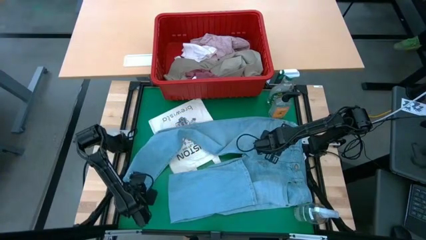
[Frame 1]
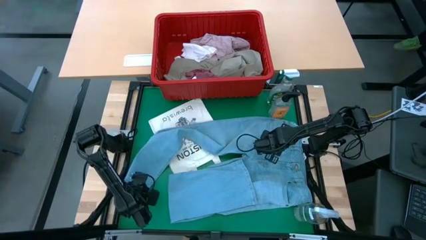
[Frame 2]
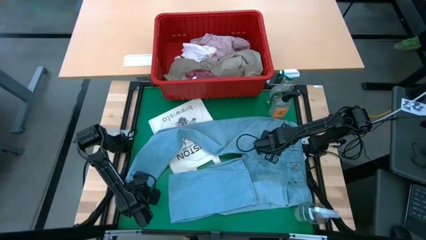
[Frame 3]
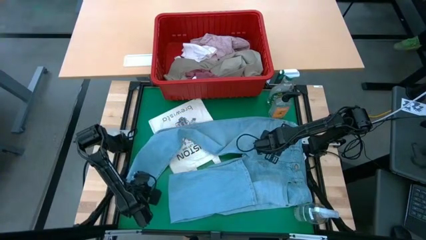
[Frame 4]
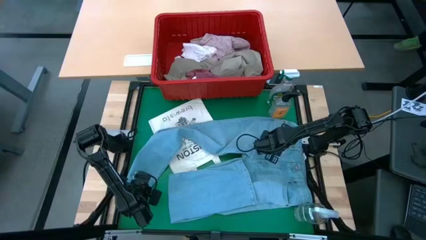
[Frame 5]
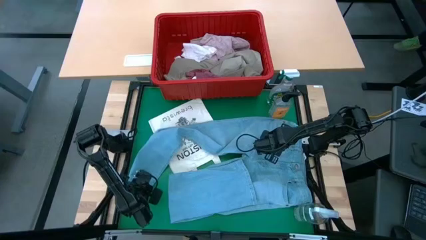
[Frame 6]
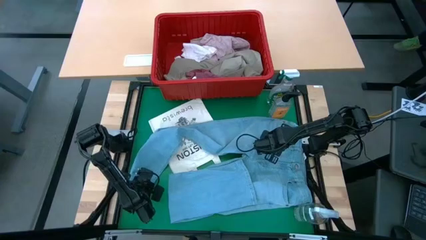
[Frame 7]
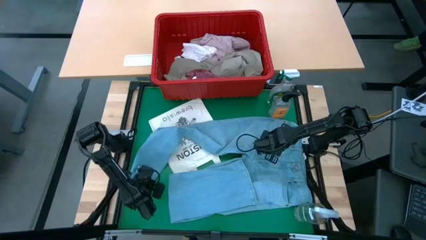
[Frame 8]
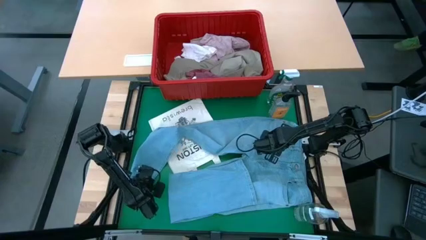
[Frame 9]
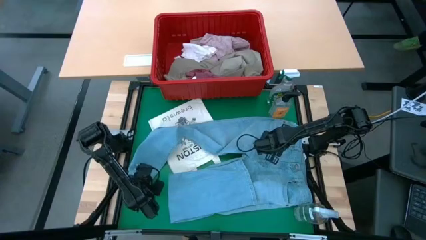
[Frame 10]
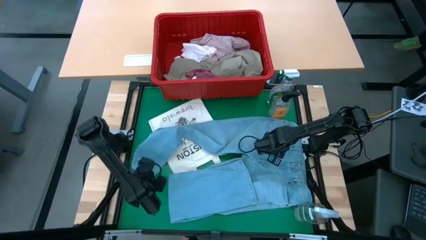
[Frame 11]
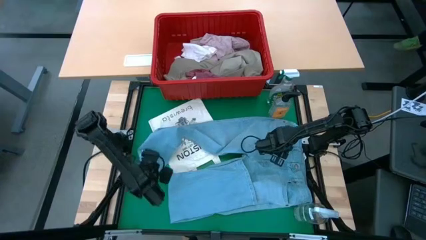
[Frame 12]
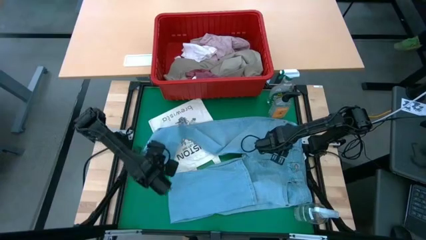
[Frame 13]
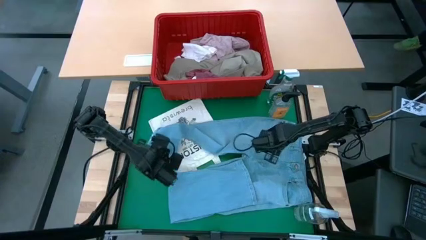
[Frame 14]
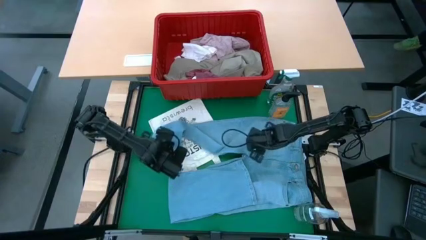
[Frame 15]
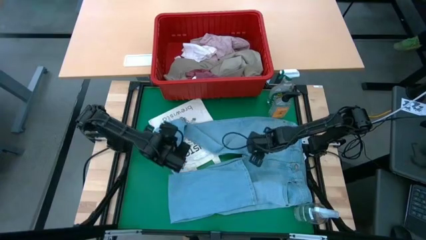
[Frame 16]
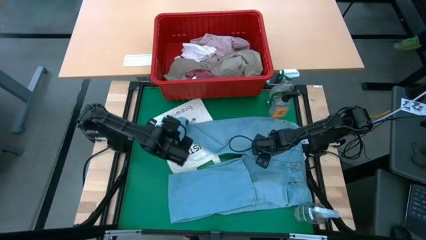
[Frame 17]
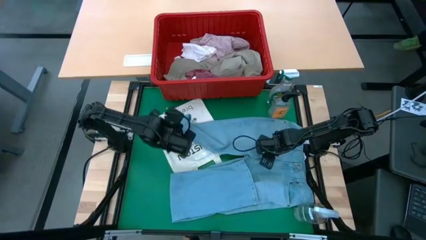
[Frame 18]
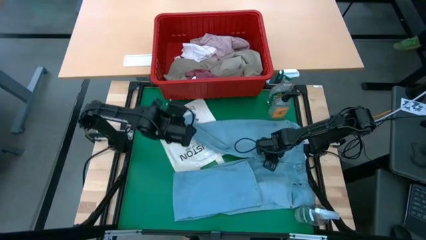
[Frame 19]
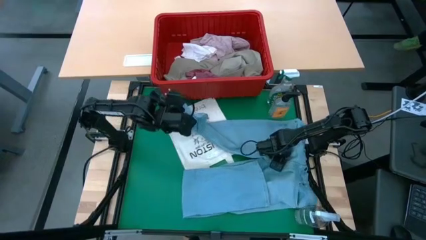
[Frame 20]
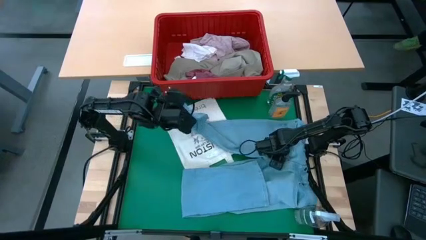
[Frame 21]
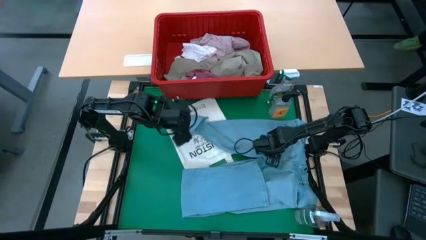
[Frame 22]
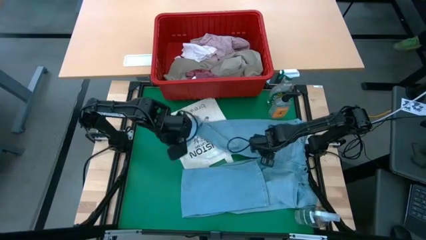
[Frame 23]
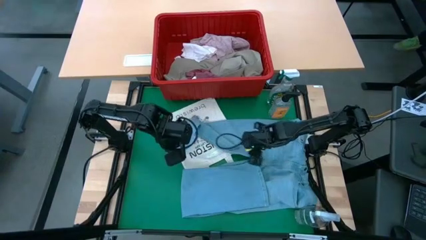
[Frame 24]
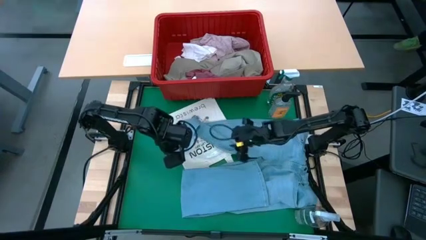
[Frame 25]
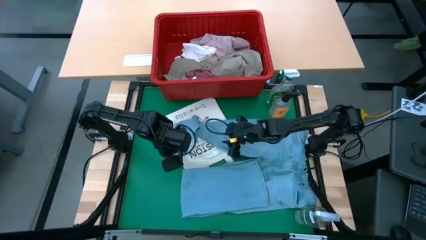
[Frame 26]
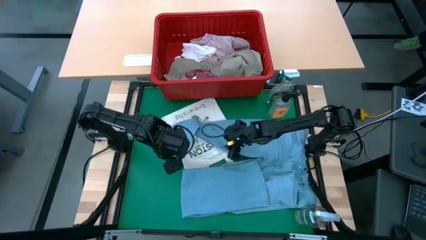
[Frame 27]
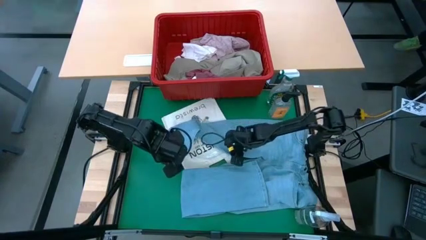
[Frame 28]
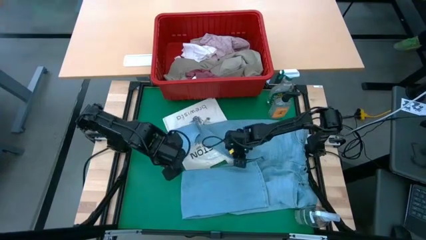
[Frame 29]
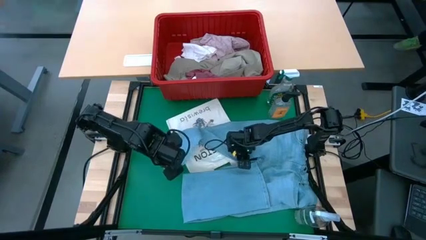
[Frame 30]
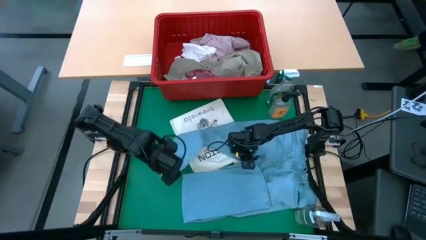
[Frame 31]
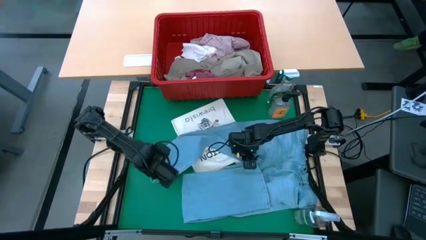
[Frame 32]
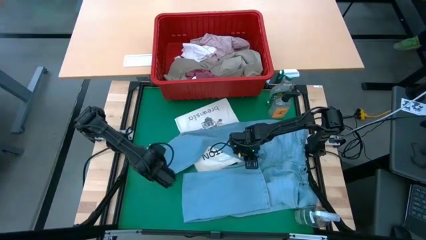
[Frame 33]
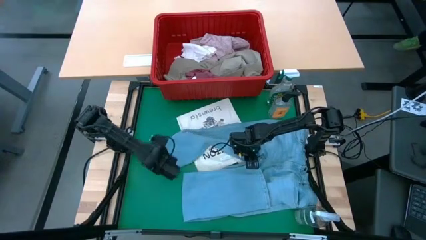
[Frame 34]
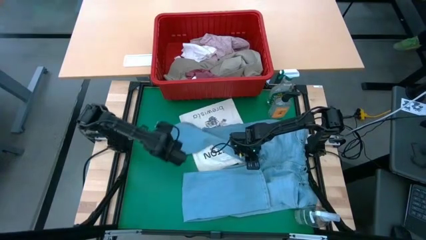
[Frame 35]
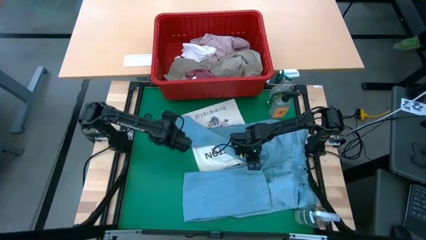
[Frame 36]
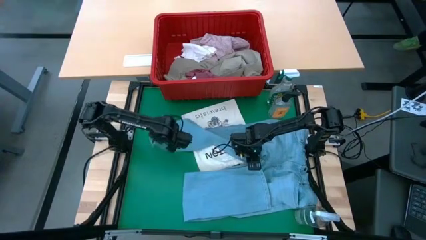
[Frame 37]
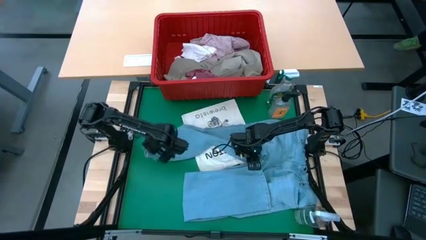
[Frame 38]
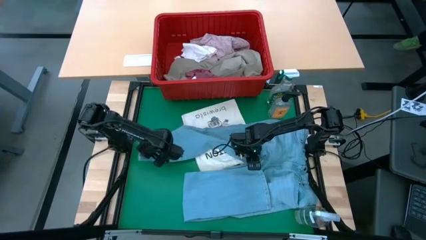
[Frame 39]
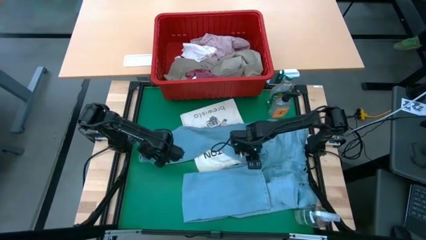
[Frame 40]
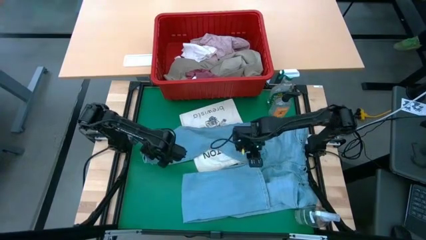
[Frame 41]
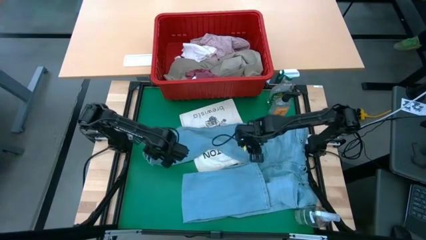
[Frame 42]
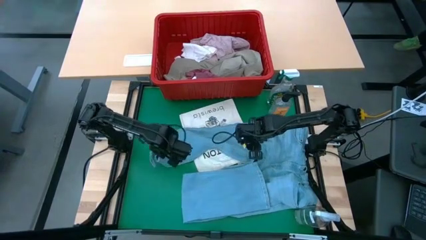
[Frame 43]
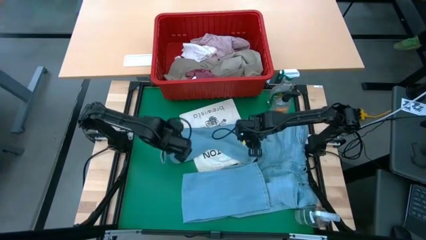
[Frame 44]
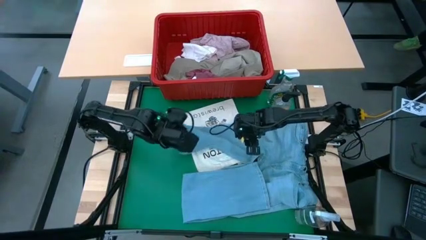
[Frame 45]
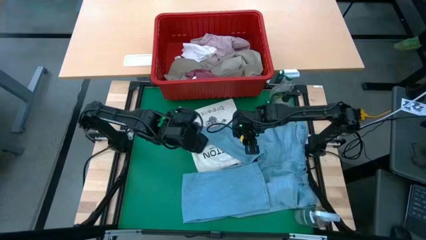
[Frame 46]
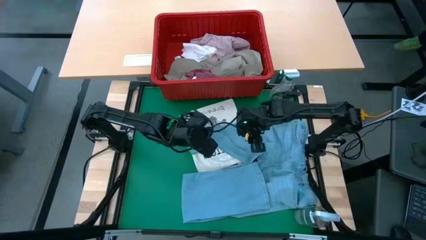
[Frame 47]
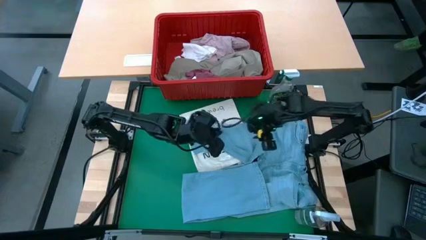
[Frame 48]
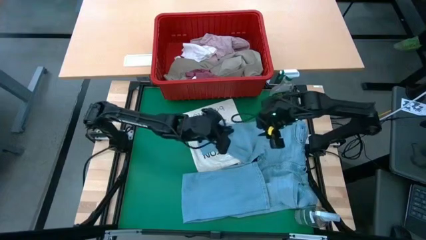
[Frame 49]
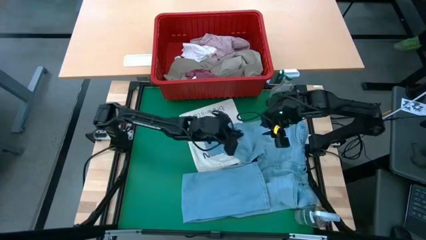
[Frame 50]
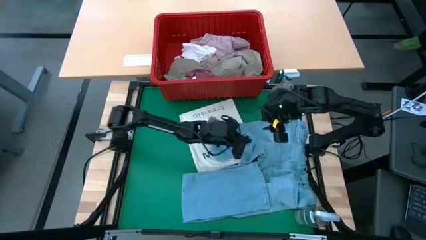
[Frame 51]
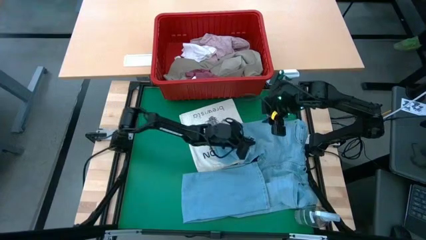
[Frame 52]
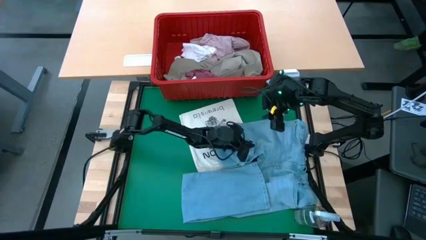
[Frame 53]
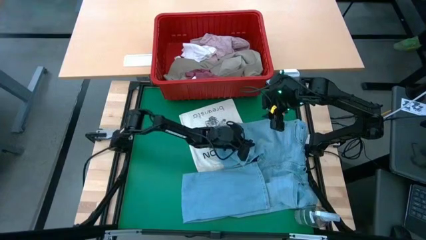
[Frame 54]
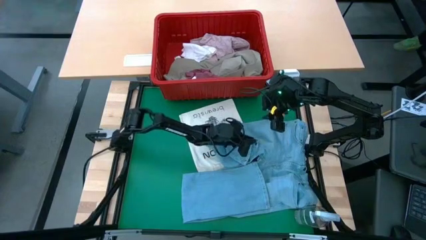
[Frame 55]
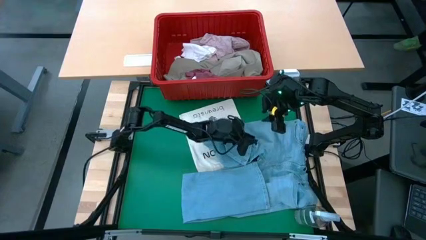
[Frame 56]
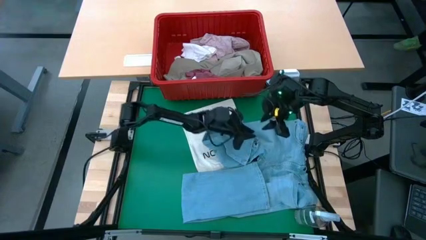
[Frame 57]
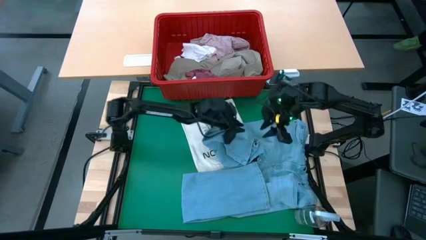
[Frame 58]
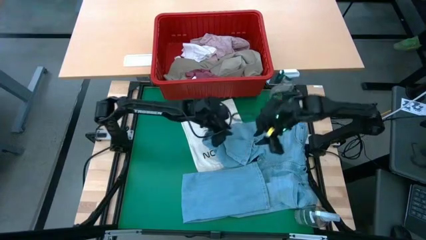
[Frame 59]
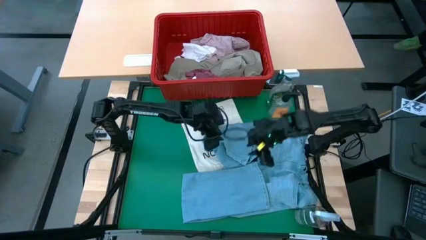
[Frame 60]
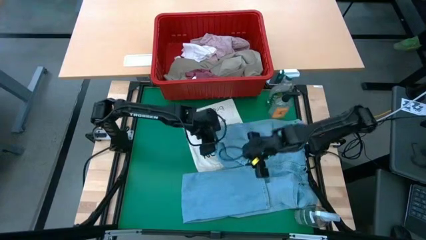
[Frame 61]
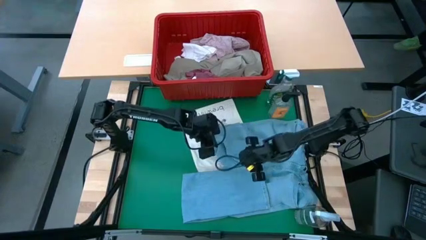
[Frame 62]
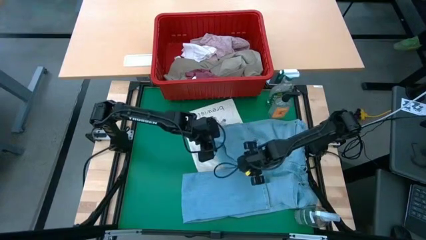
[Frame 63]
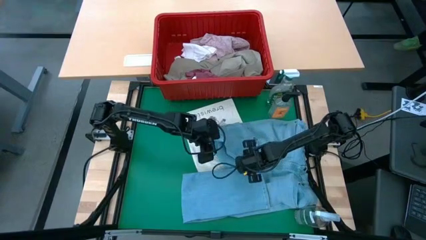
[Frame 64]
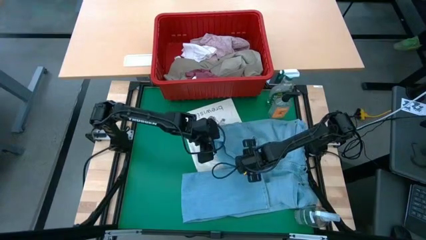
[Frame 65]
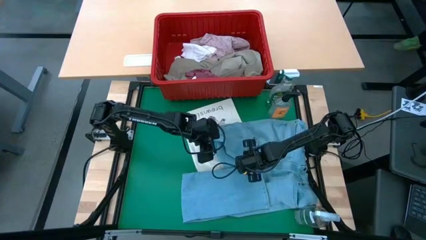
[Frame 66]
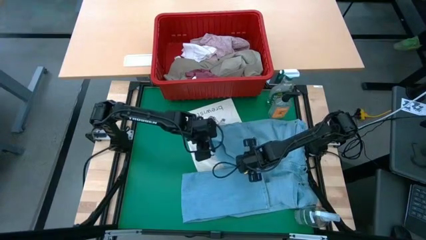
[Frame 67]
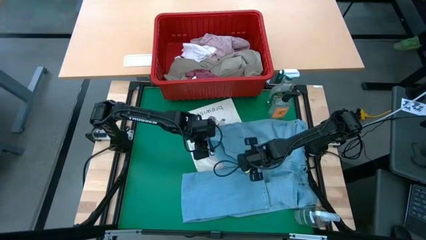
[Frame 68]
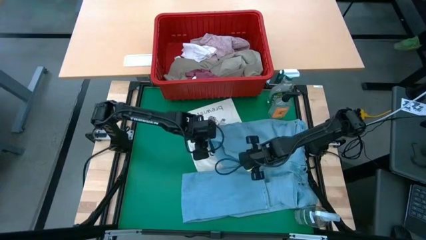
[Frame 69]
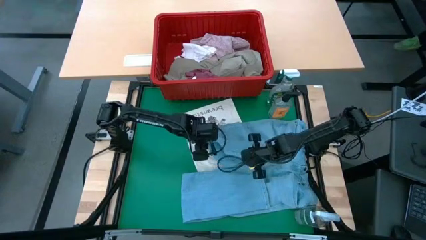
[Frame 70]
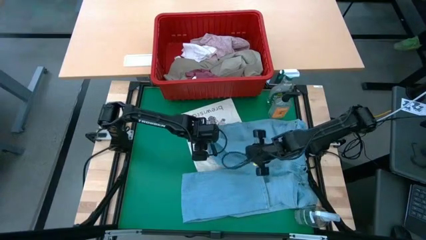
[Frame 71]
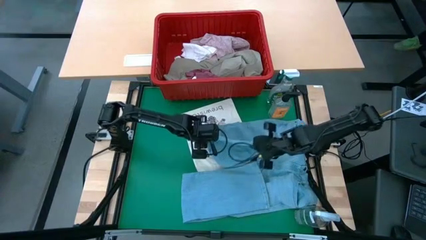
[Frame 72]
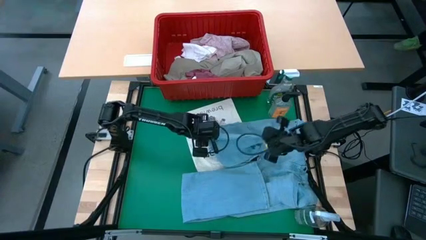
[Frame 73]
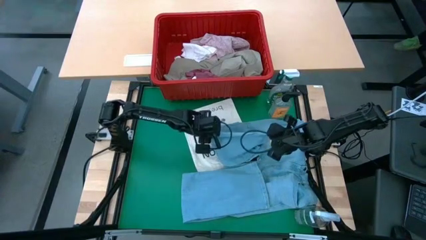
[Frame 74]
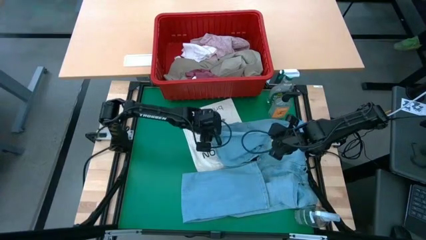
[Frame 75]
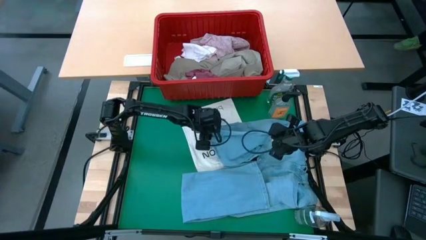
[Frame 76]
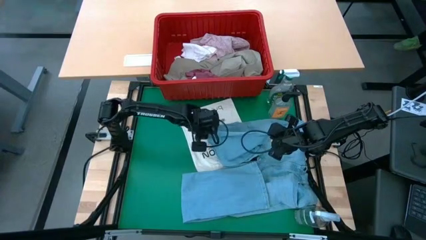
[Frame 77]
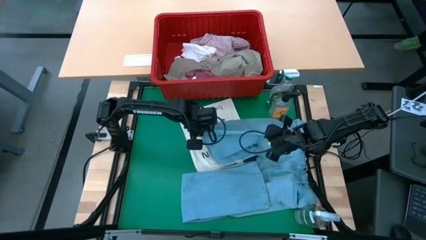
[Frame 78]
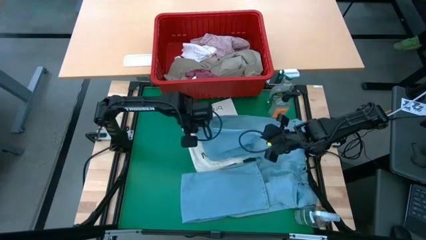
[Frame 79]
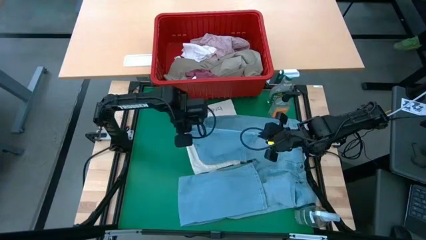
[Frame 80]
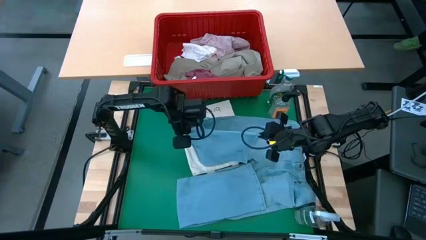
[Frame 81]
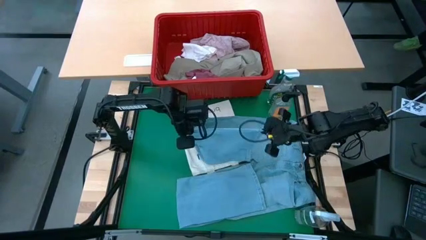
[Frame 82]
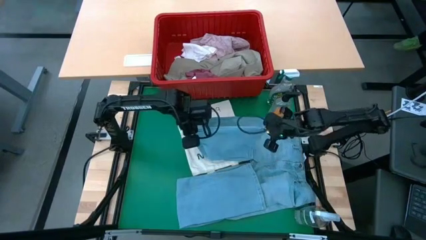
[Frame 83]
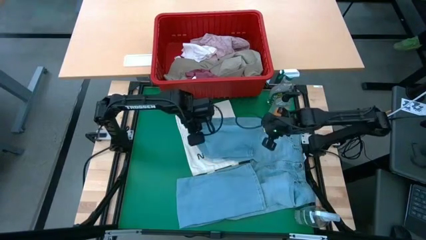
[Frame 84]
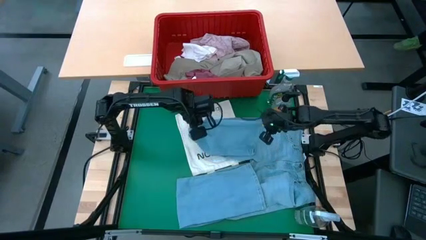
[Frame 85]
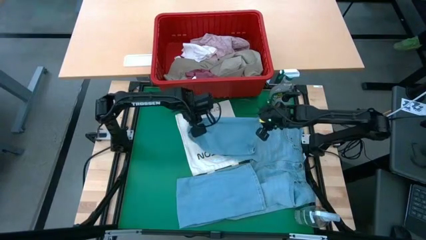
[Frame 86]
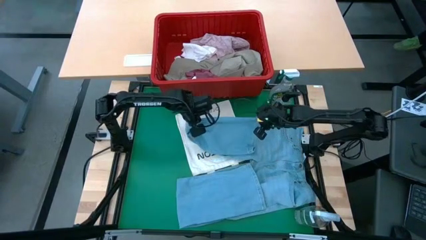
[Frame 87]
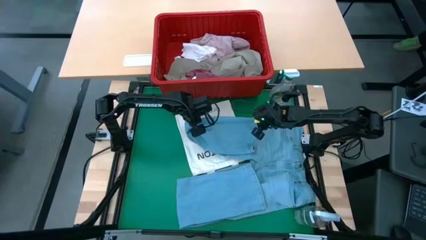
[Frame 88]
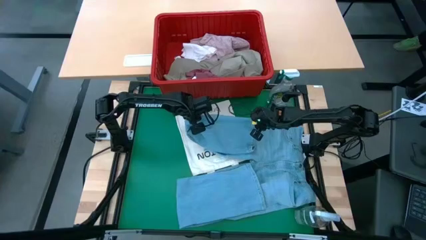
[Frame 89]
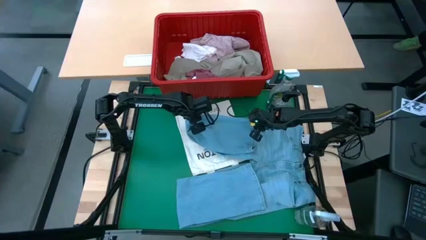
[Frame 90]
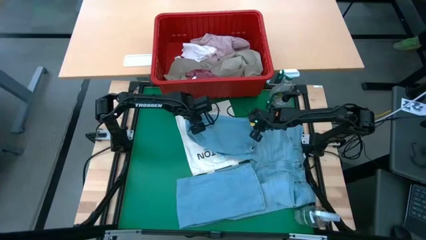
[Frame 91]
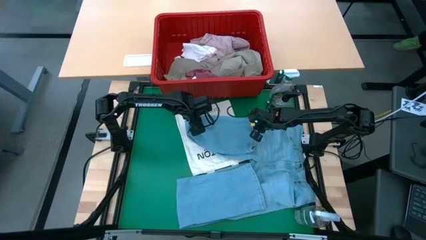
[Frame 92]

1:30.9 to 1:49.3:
Task: Fold laundry
Fold the light blue pants
